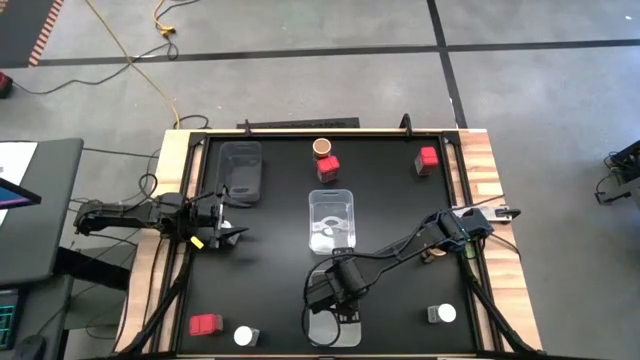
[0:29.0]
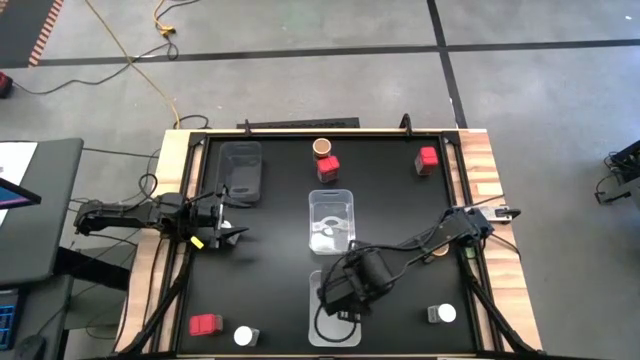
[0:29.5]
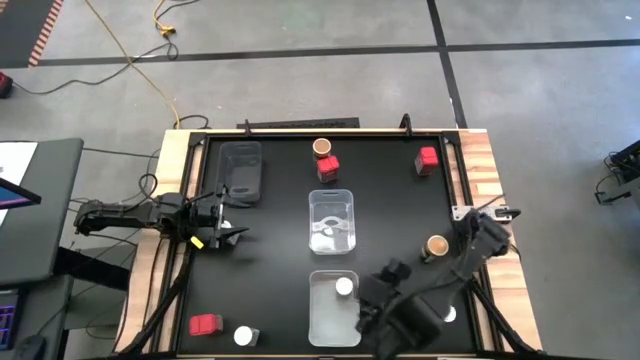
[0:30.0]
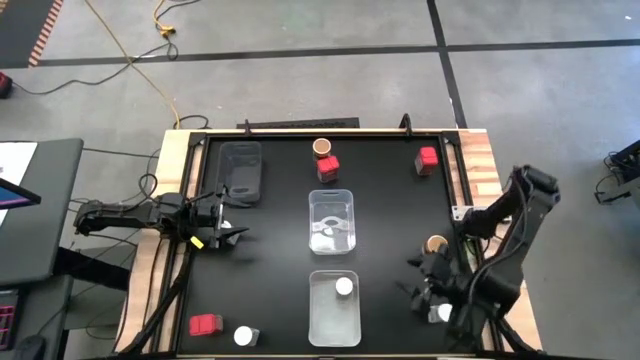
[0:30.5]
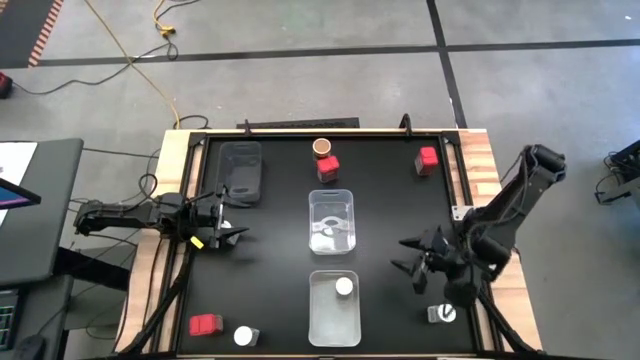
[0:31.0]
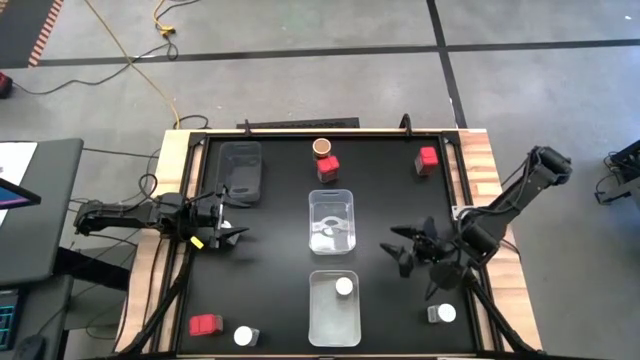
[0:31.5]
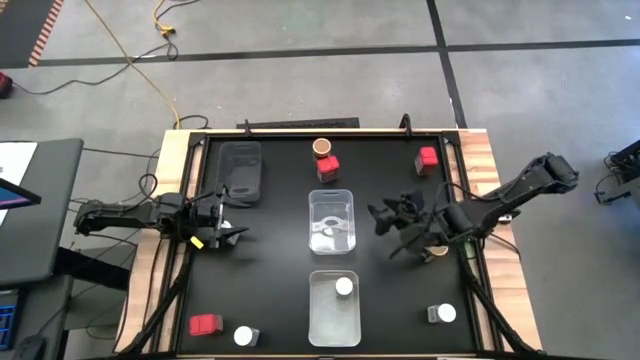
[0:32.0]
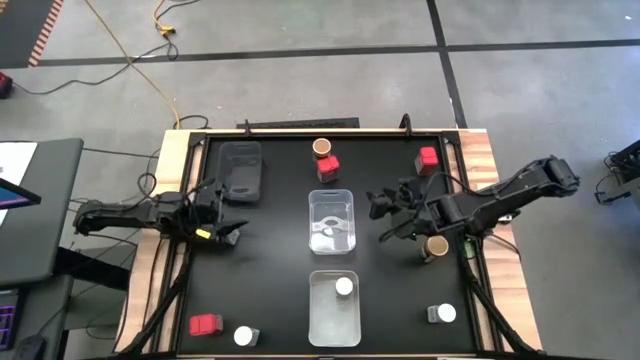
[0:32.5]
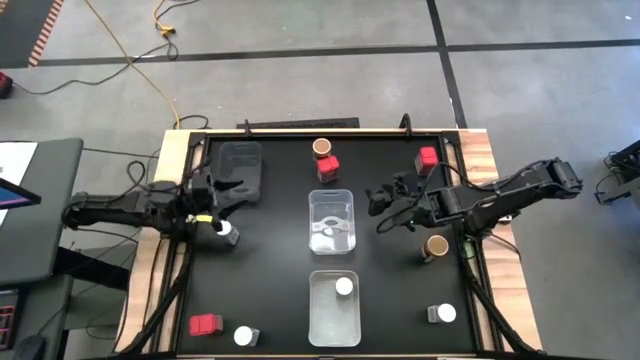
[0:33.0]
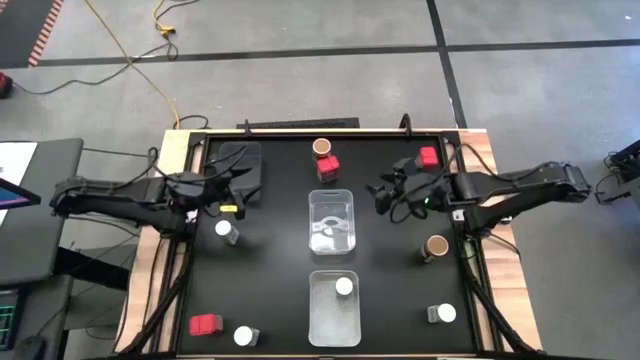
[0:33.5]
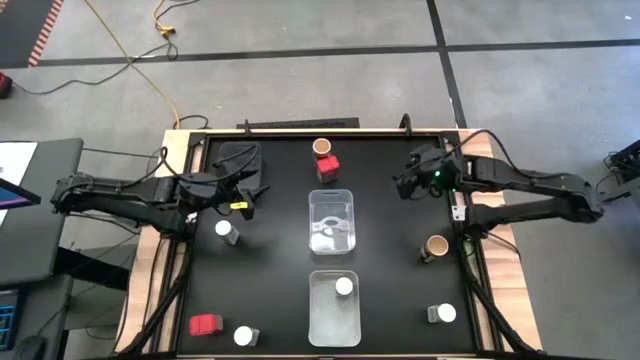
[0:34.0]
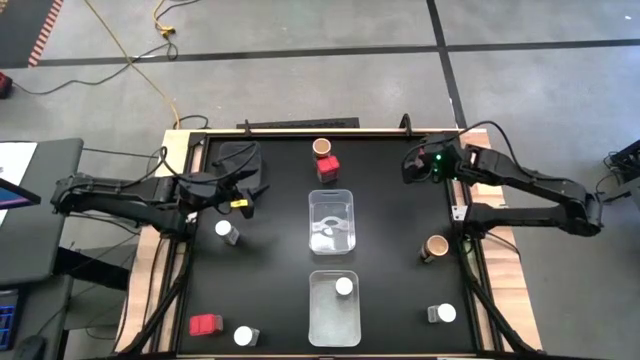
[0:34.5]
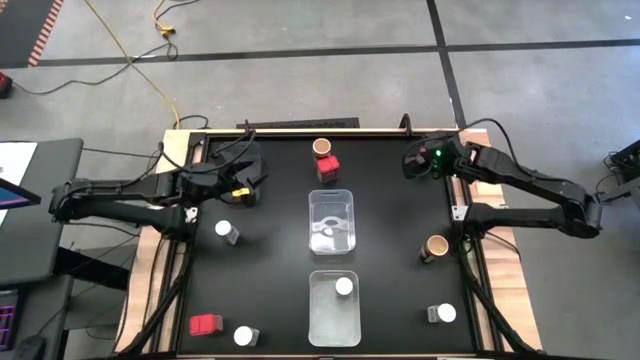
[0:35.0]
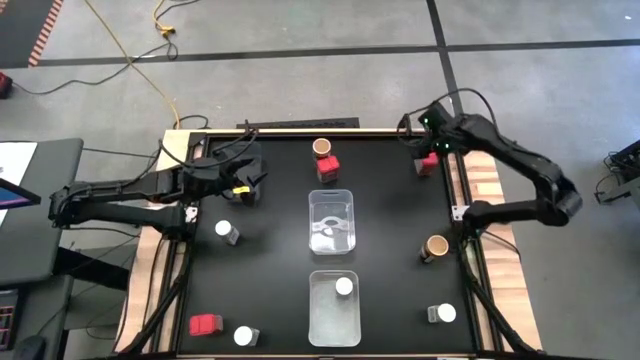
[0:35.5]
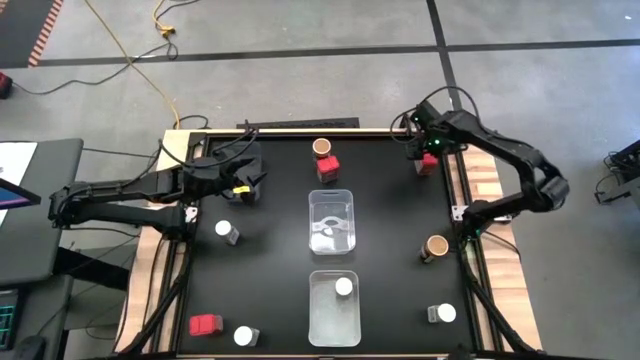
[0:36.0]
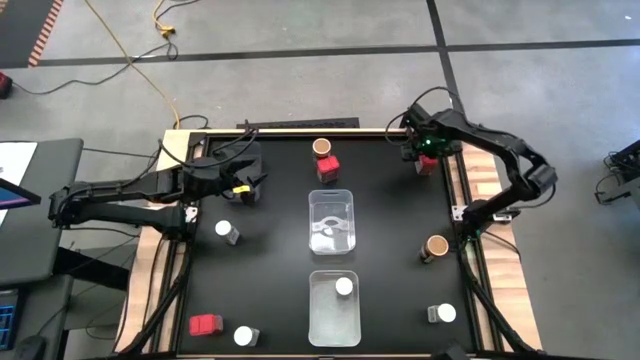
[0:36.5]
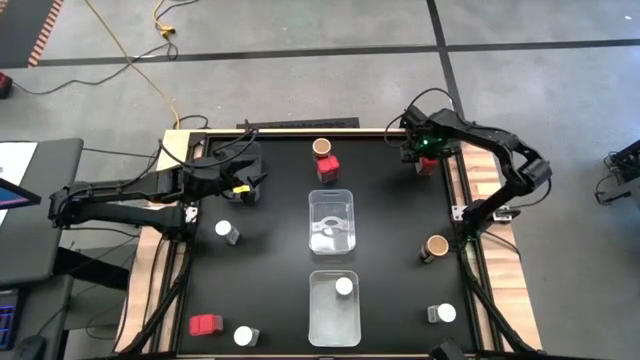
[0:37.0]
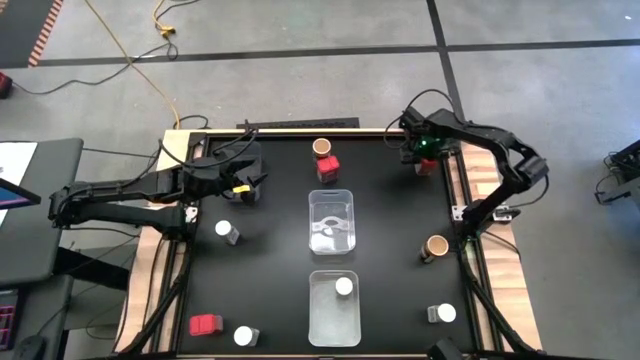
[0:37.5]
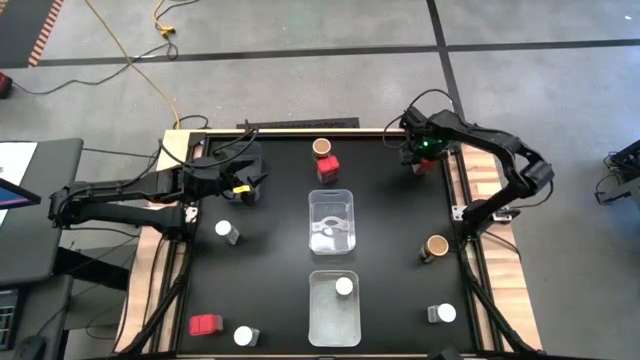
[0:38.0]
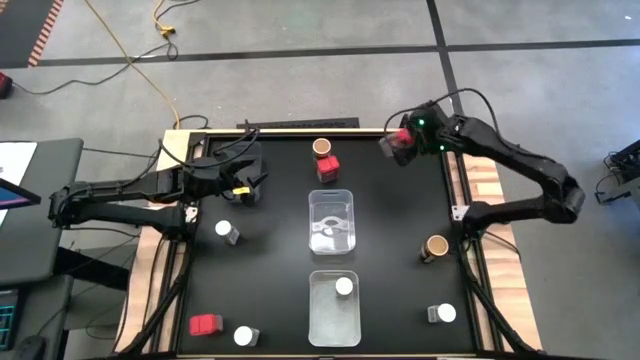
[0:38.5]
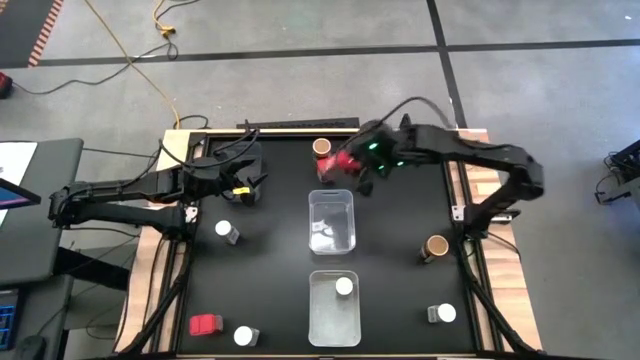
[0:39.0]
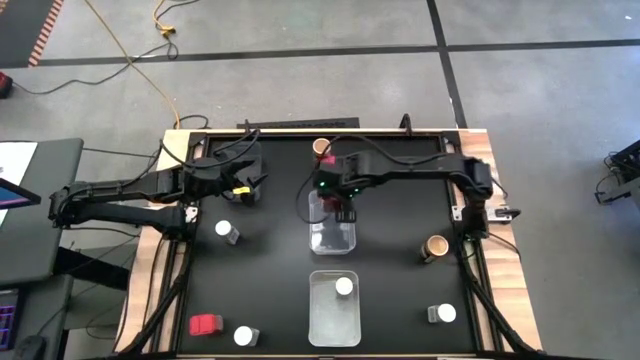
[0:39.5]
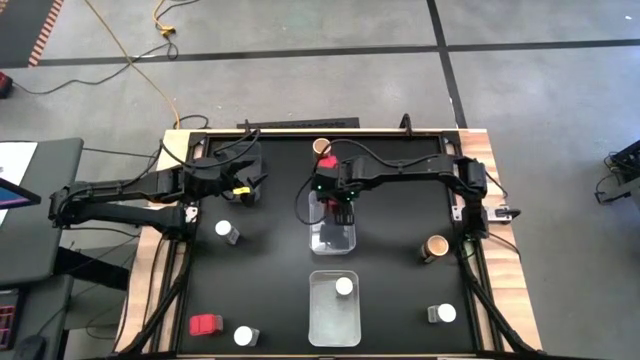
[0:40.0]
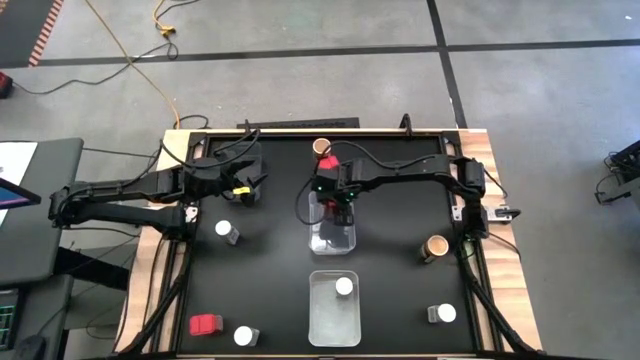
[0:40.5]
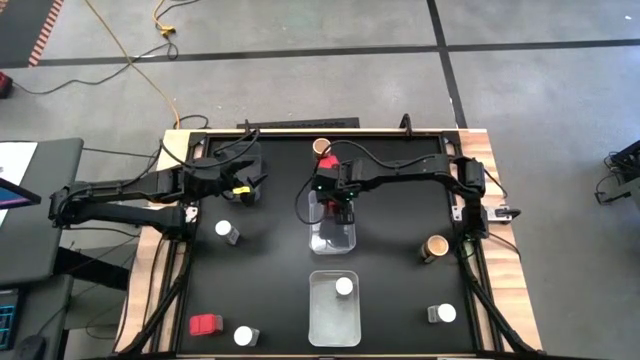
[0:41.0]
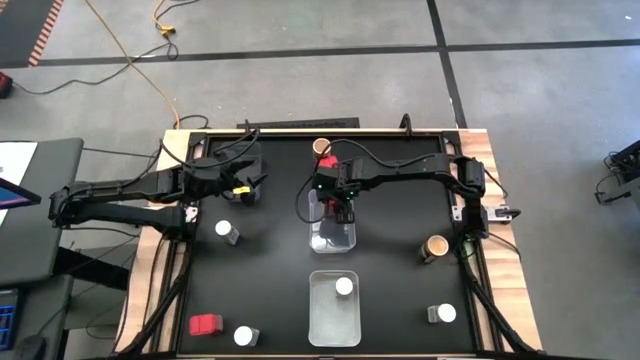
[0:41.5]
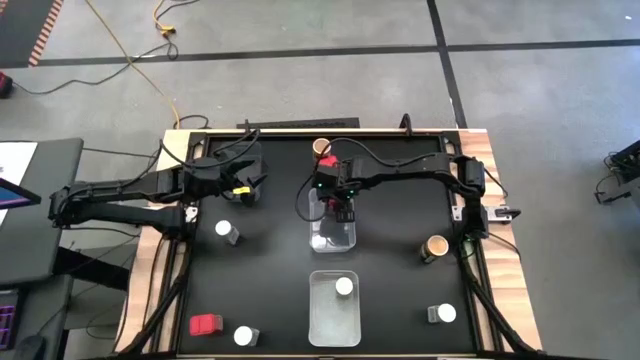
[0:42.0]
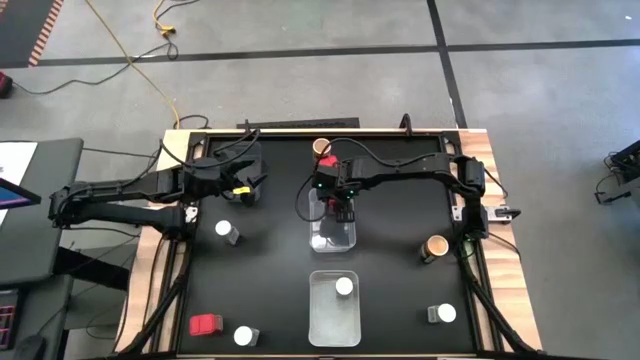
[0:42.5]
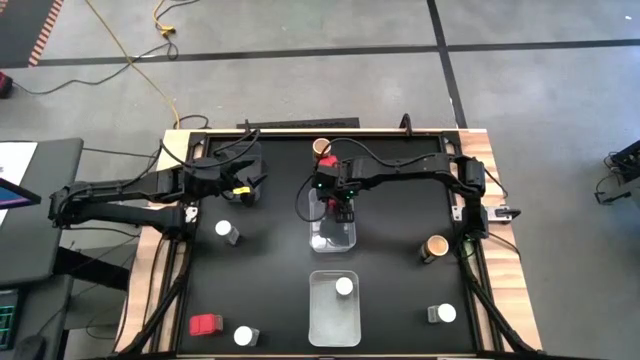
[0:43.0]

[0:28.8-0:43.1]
Task: Sort spices by type
Put the red seasoning can into the transparent bin

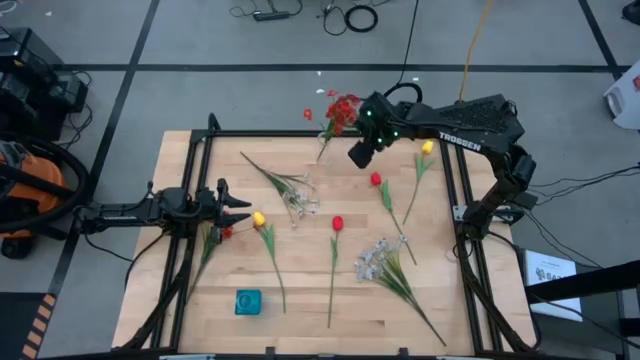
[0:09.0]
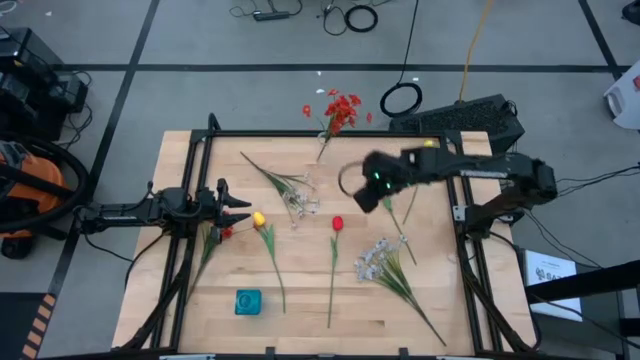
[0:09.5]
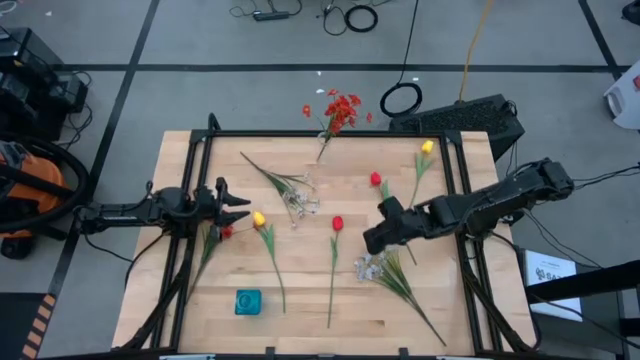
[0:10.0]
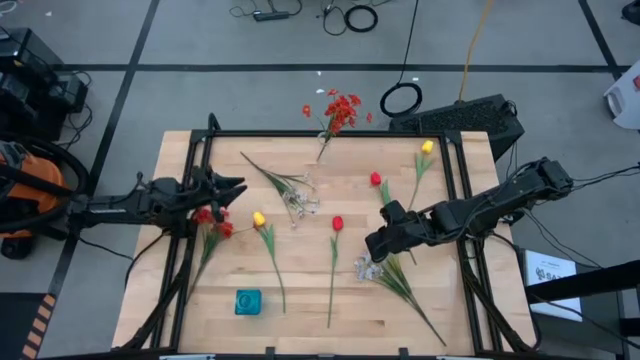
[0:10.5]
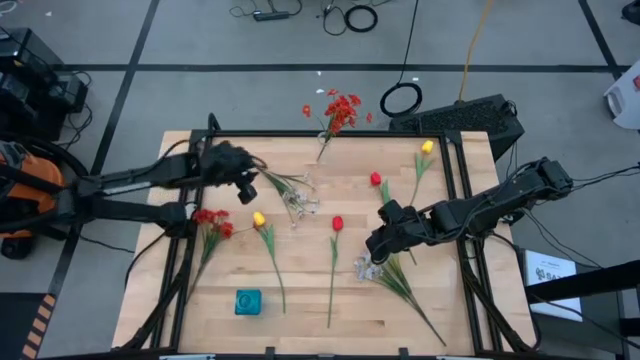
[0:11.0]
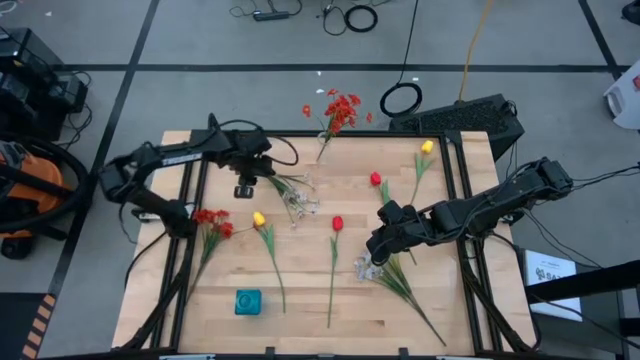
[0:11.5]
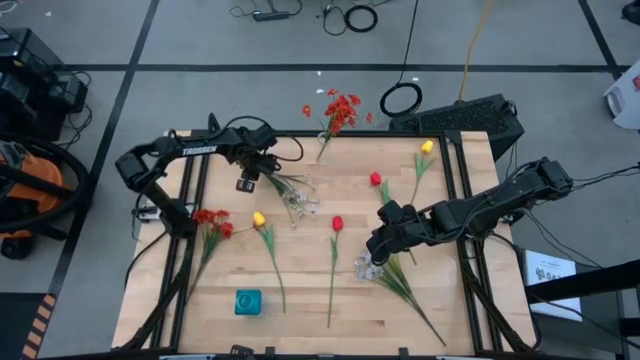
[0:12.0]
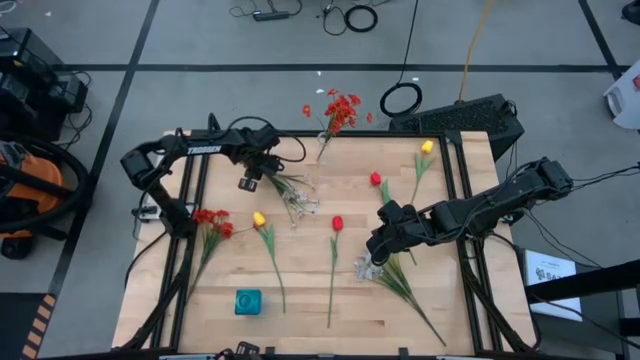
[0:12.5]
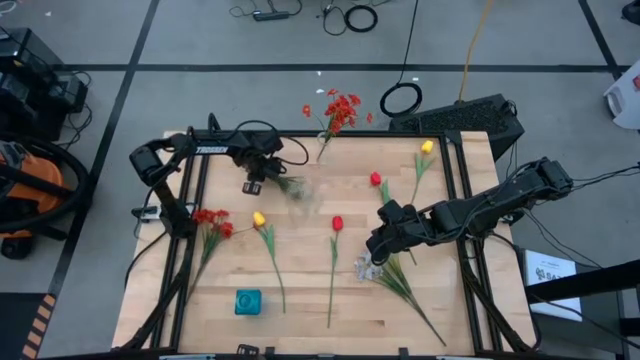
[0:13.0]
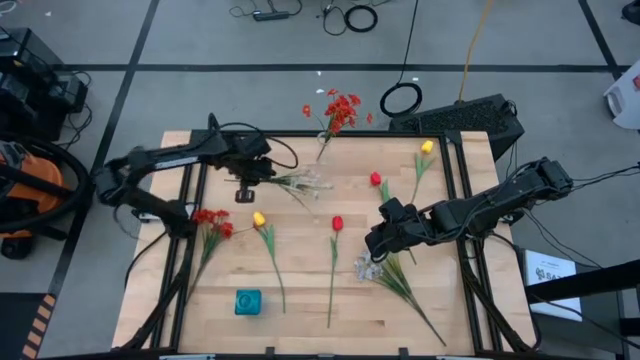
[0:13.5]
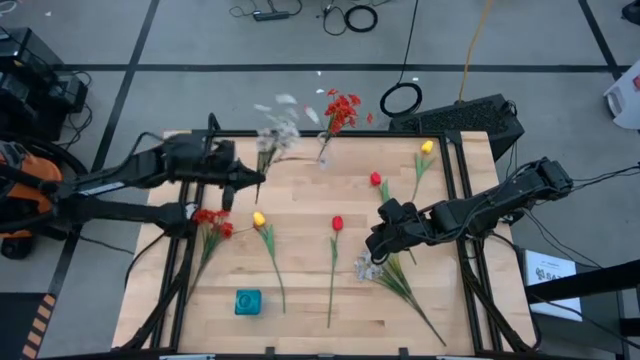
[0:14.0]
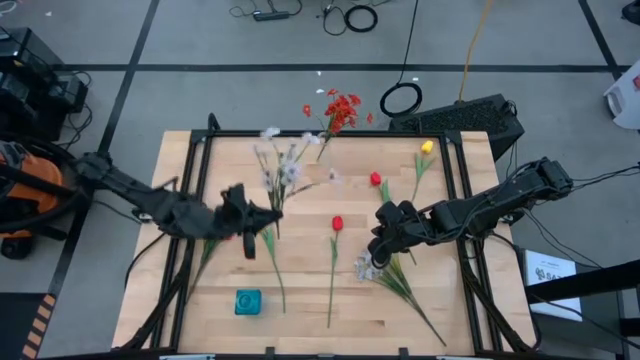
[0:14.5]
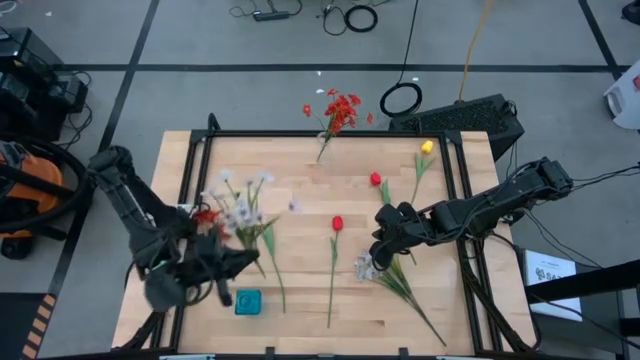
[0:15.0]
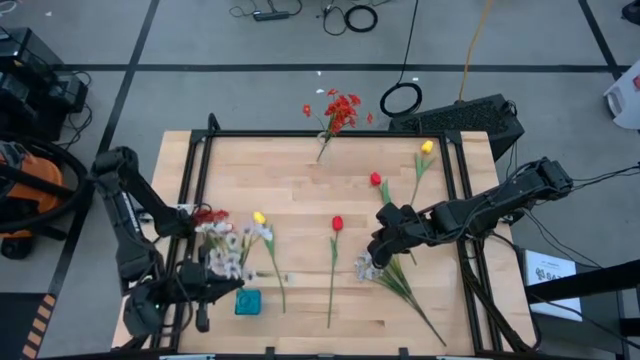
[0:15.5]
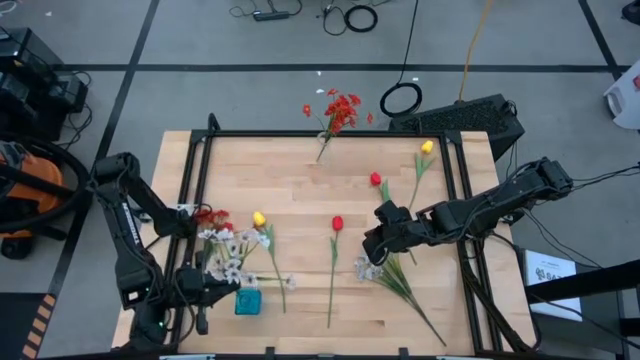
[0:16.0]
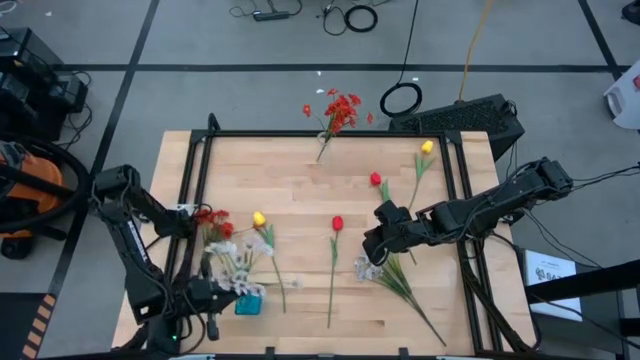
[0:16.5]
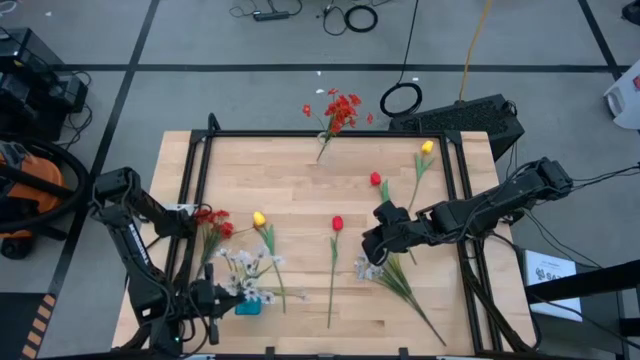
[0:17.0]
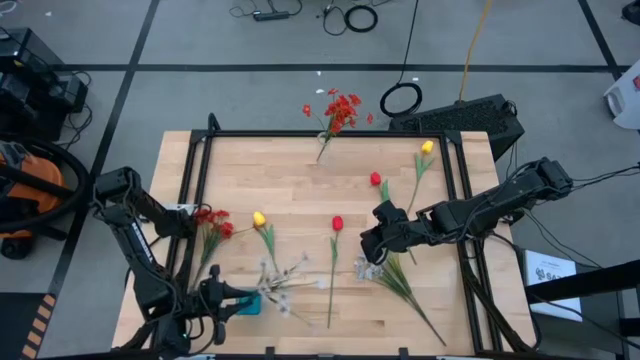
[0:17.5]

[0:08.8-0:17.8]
Task: Sort flowers into vase by color
Put the left white flowers into the blue vase
